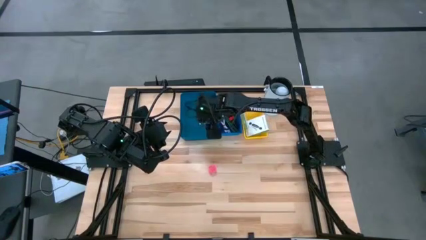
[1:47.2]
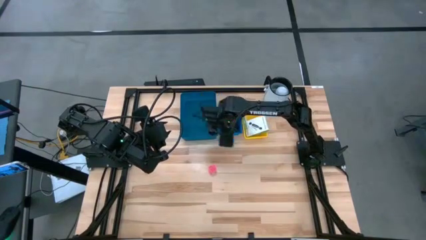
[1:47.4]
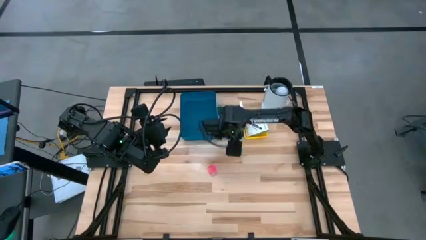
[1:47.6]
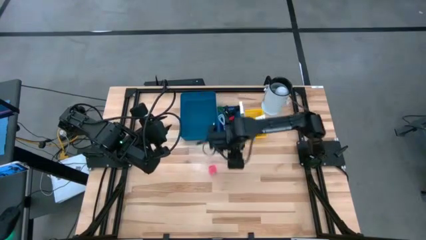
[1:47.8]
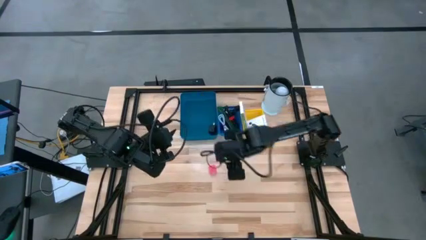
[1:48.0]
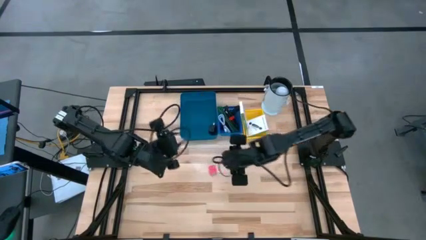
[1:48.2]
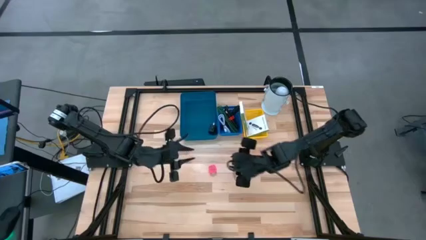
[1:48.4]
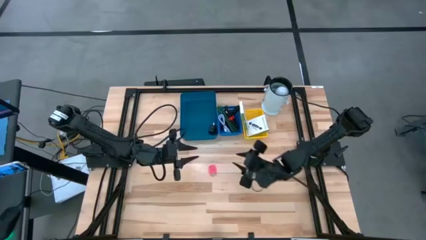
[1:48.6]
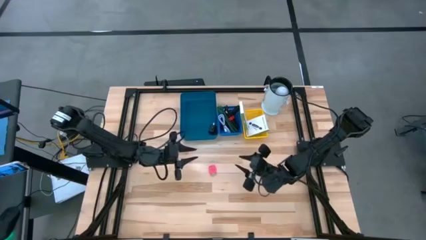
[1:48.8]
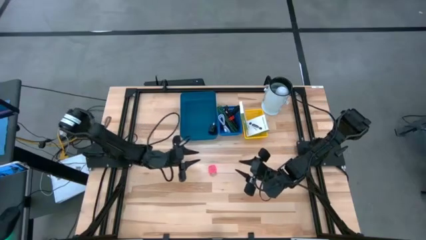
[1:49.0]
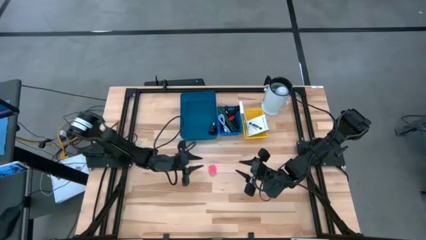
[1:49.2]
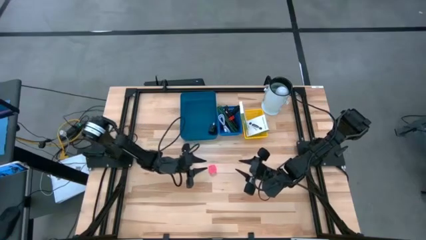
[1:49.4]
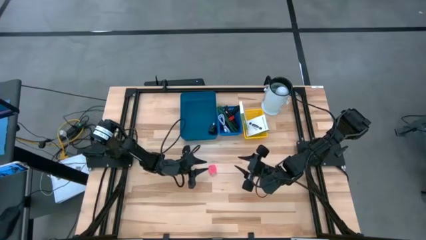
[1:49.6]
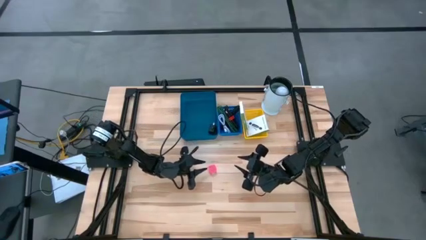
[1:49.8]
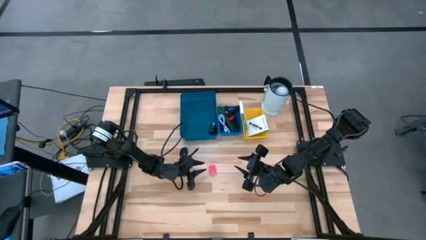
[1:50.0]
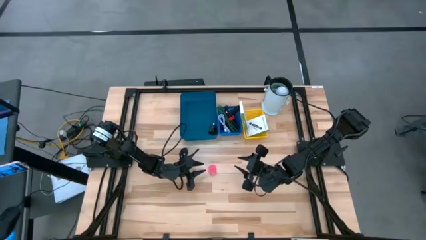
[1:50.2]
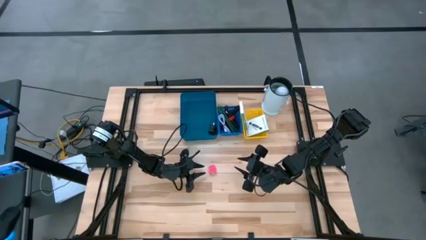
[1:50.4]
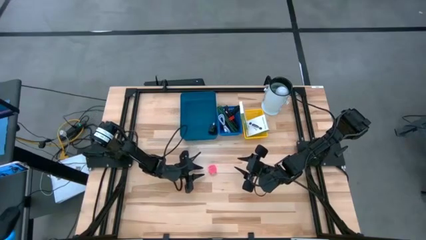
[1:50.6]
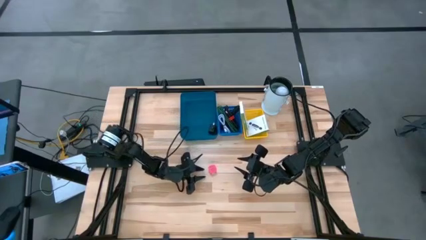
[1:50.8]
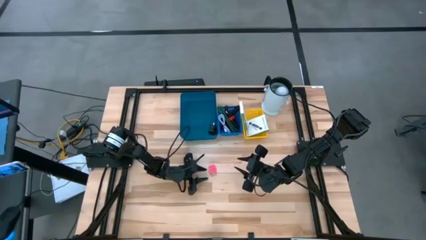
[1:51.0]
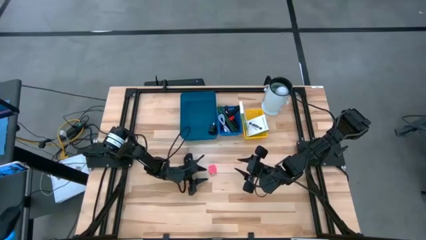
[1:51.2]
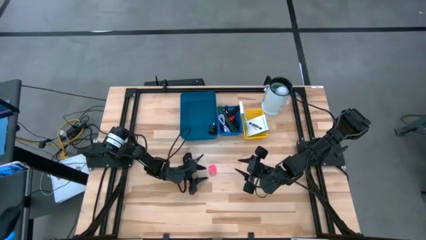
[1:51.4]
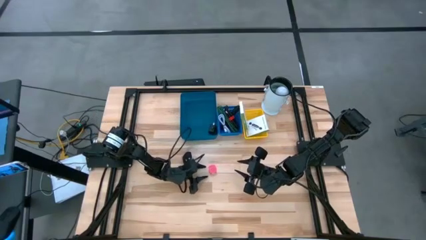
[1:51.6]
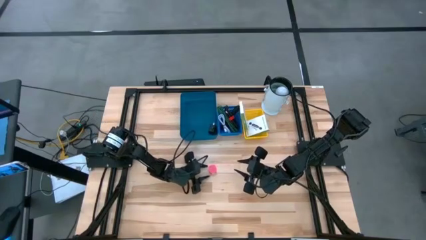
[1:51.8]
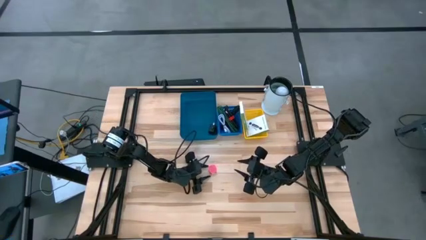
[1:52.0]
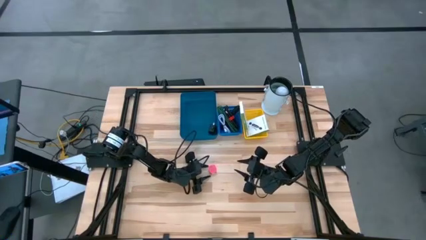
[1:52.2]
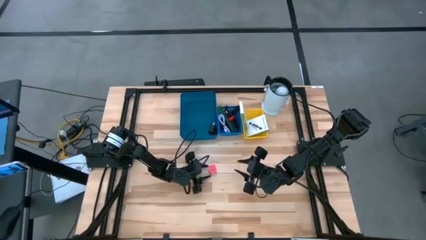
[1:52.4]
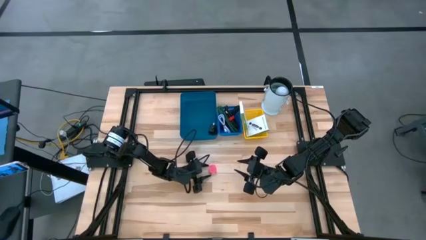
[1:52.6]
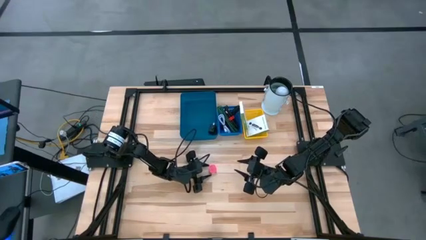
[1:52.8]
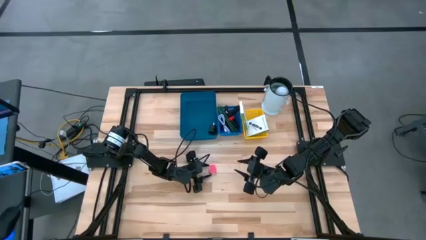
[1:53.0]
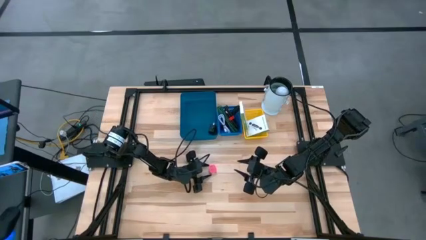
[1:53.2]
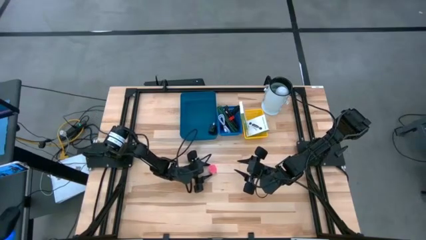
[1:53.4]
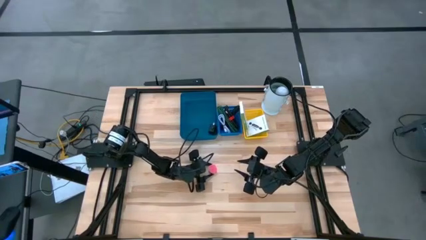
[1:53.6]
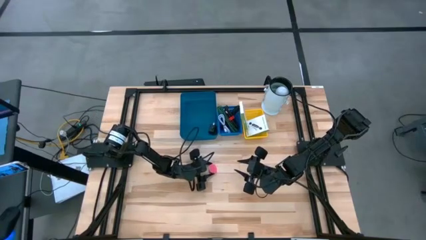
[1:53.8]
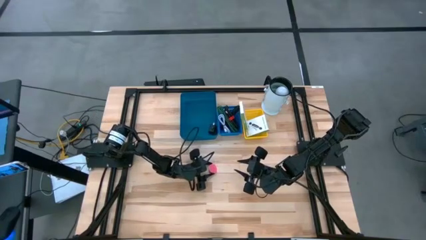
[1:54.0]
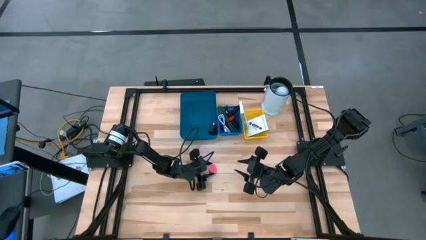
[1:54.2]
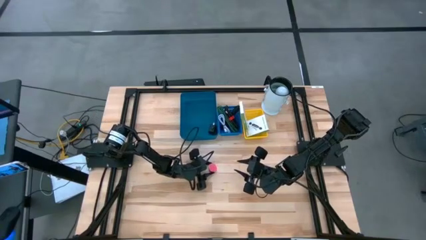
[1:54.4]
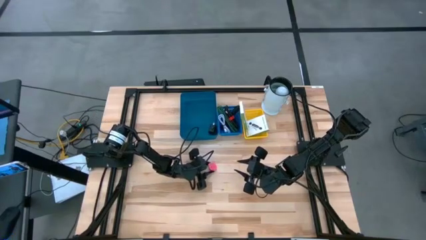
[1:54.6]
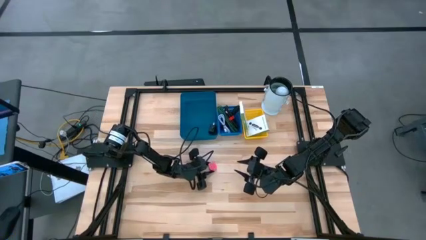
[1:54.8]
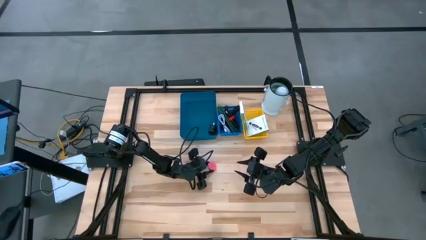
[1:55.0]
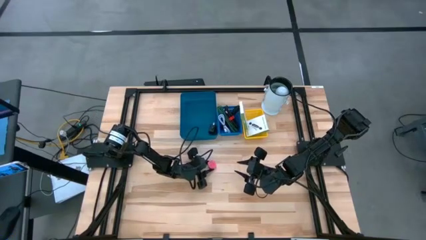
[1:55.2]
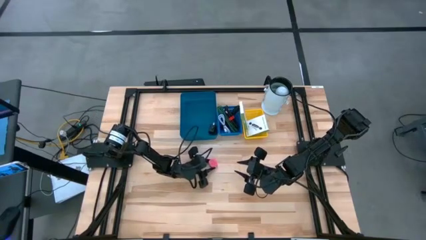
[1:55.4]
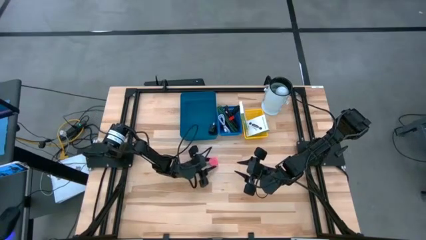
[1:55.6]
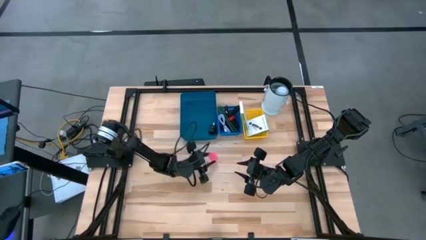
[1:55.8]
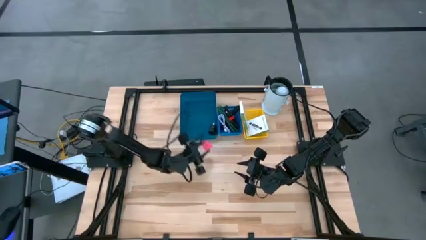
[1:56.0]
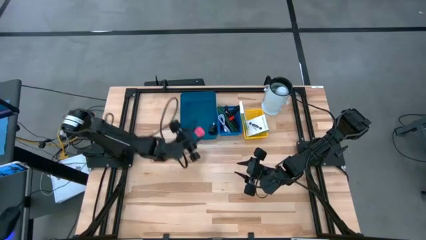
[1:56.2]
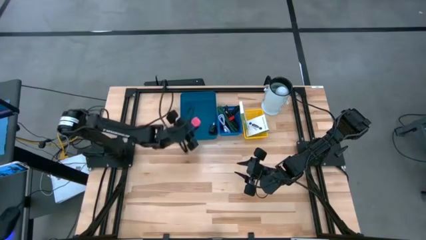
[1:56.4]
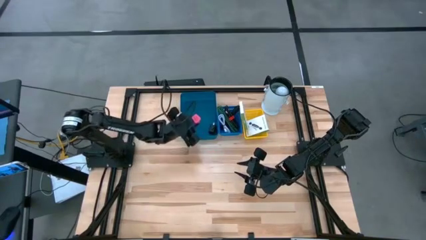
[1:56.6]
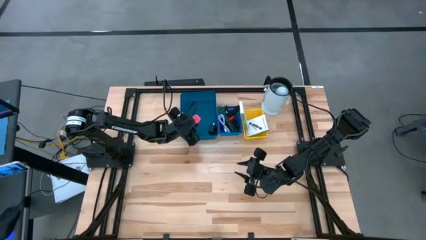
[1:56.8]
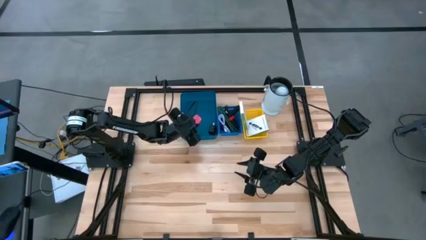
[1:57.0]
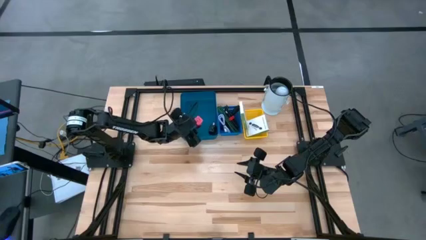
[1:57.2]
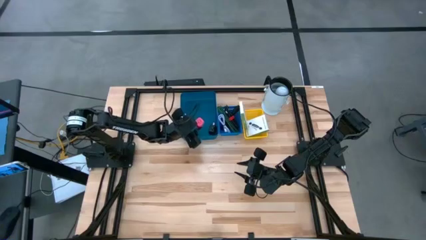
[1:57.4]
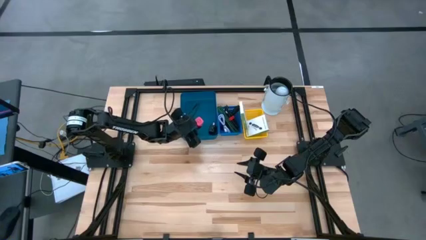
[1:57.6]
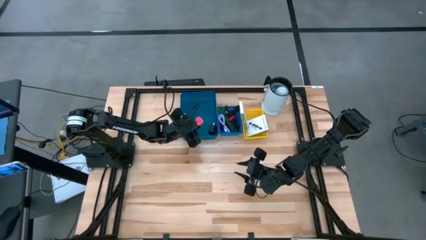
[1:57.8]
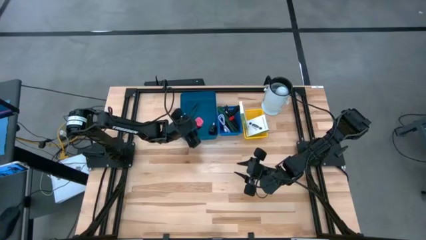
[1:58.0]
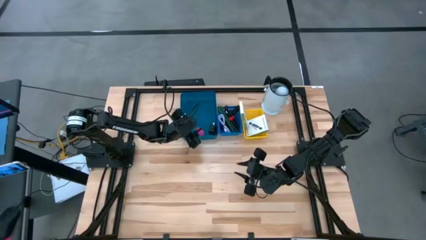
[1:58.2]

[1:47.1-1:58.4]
Task: Pick and place items into bin
Put the pink charger adapter into the left blue bin

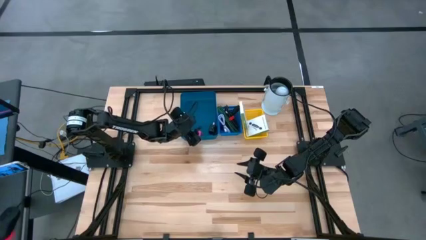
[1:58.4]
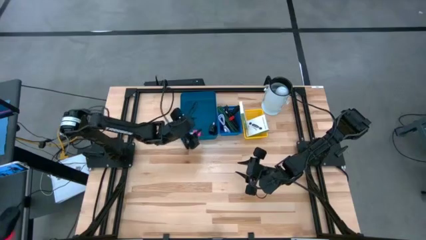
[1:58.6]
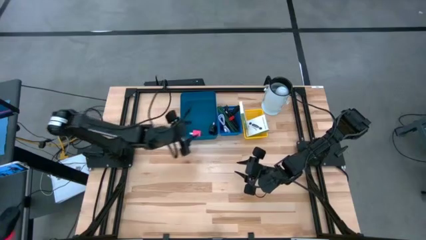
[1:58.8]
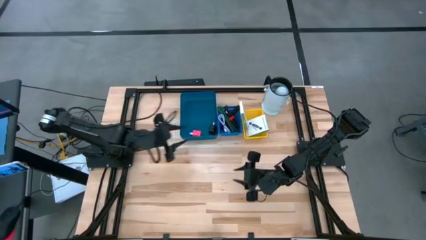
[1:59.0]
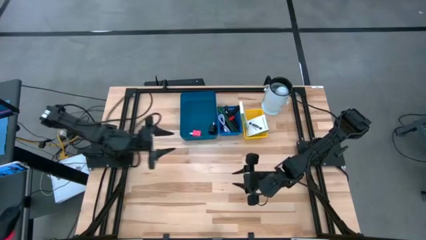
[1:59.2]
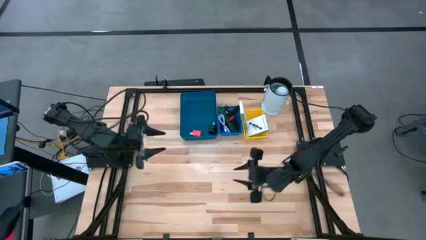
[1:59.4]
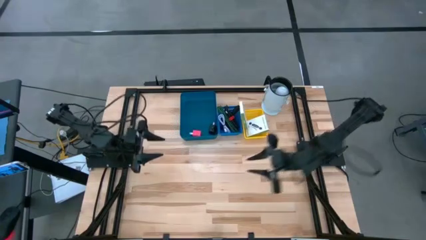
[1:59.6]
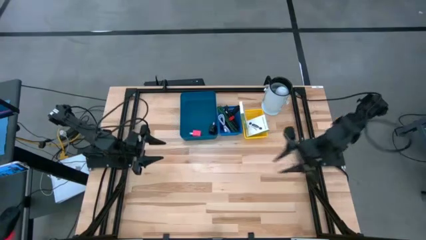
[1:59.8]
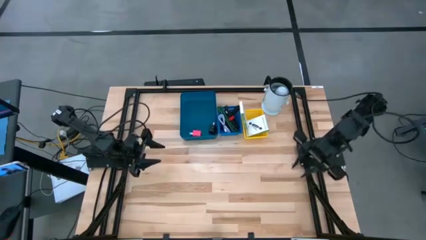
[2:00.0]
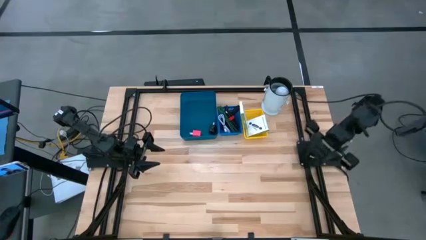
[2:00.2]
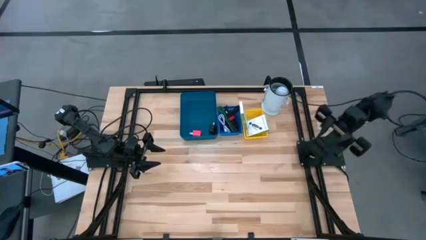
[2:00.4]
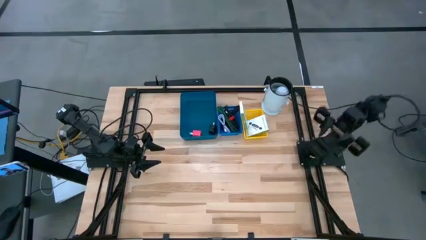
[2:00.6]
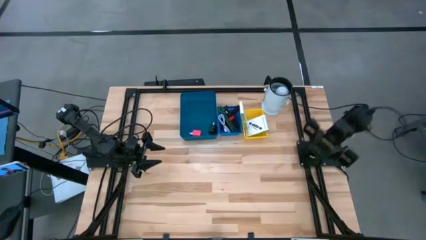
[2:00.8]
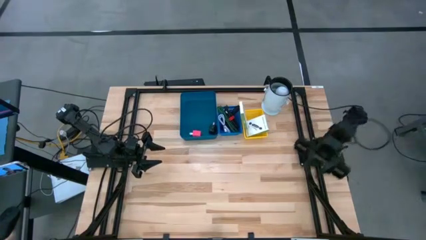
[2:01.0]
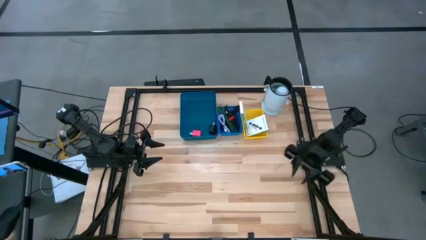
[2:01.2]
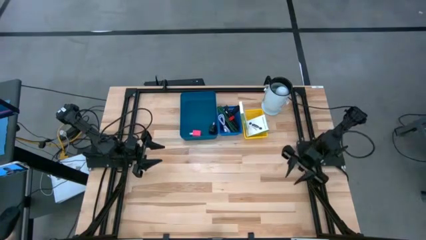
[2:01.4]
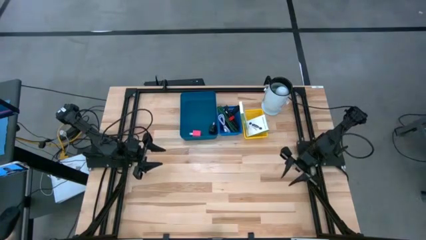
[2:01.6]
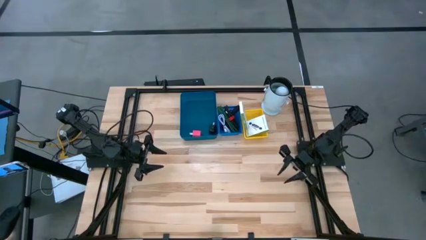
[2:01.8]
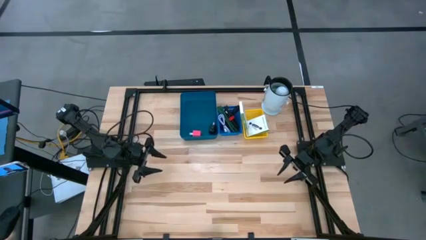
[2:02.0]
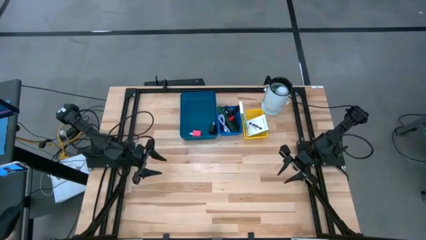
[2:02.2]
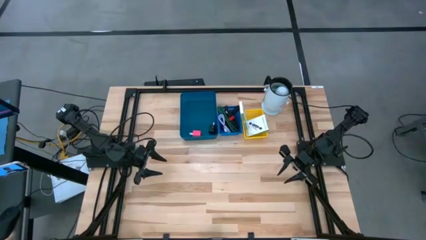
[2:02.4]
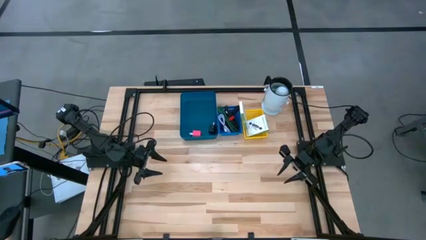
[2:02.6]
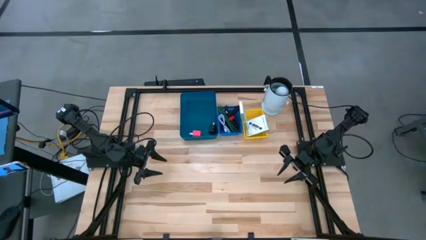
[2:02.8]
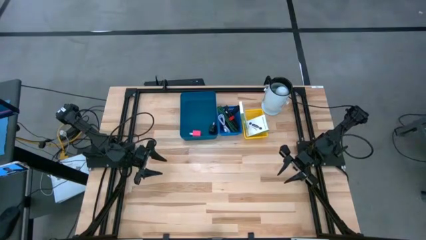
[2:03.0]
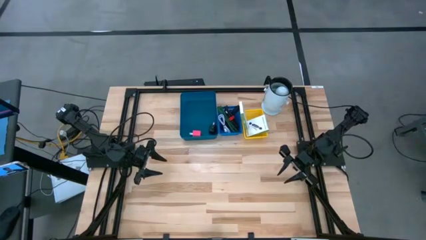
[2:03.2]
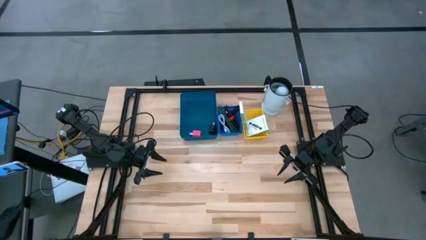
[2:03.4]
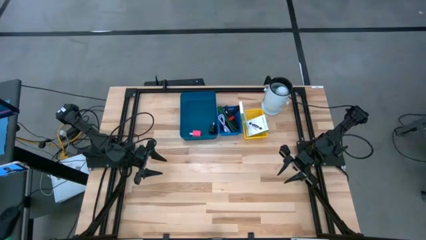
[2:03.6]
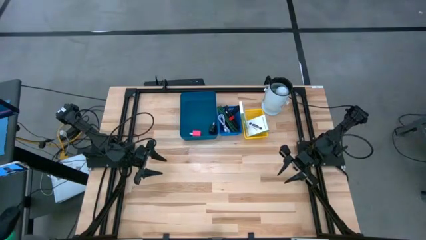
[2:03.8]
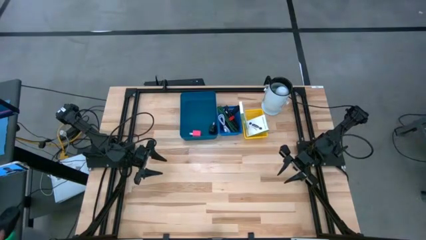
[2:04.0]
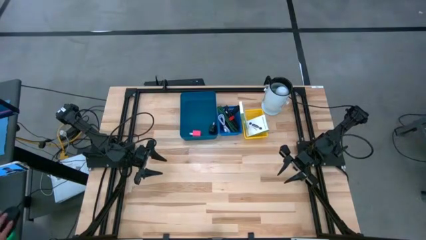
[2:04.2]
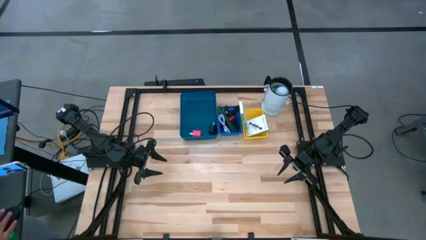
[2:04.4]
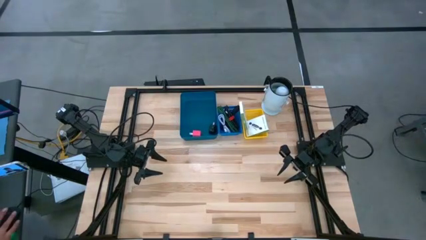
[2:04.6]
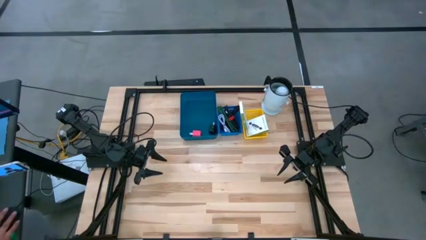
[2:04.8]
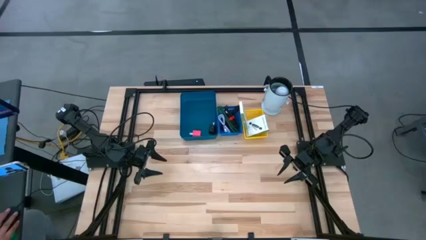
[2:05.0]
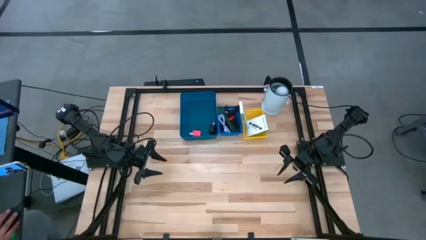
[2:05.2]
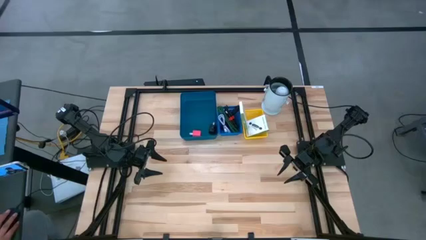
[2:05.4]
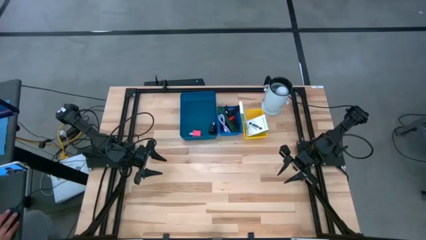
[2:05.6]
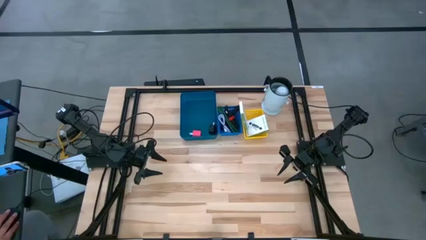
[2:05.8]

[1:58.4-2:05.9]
Return to Home Position
